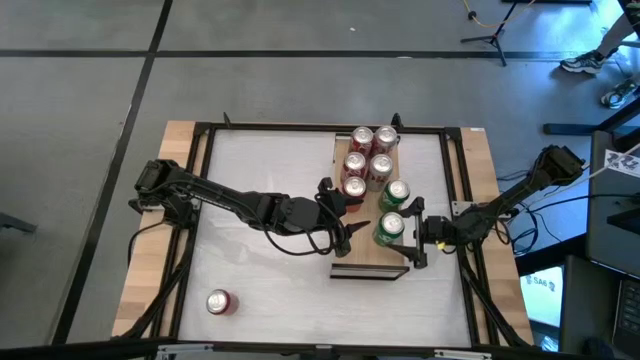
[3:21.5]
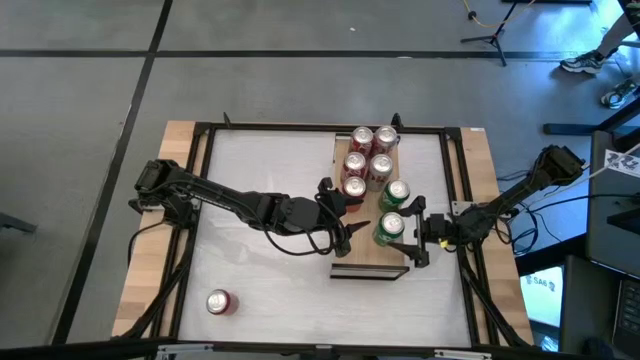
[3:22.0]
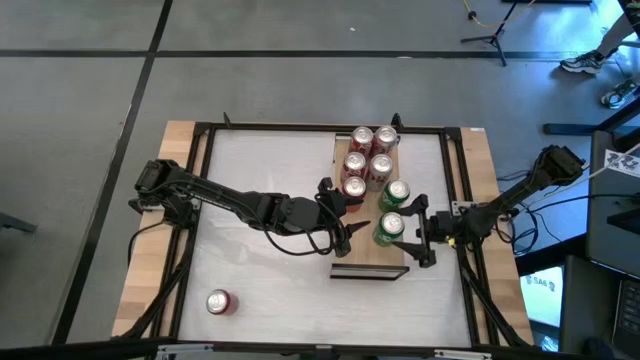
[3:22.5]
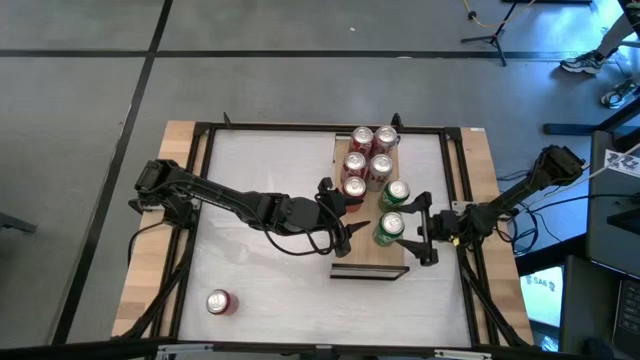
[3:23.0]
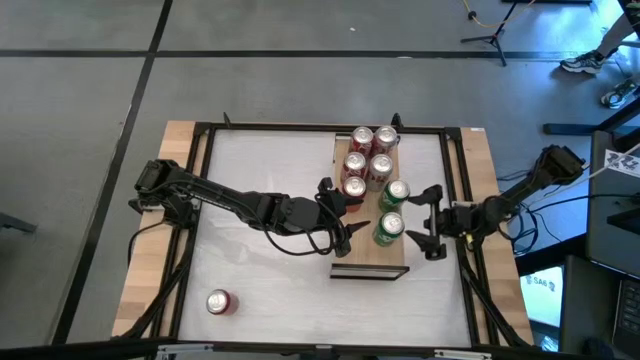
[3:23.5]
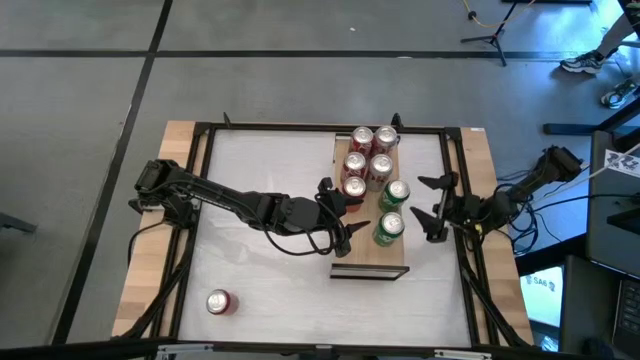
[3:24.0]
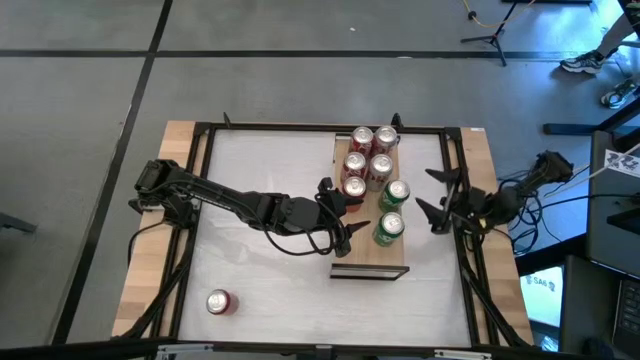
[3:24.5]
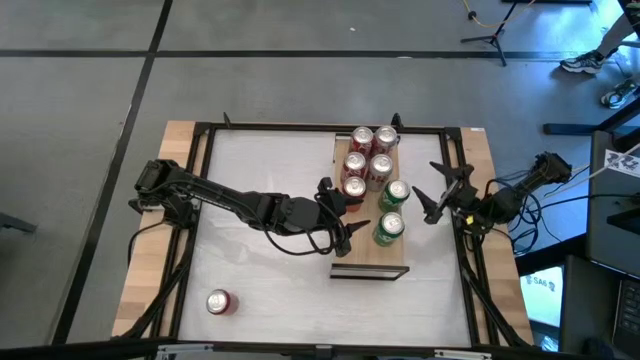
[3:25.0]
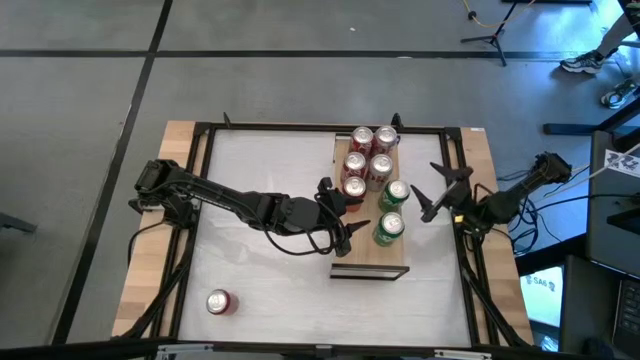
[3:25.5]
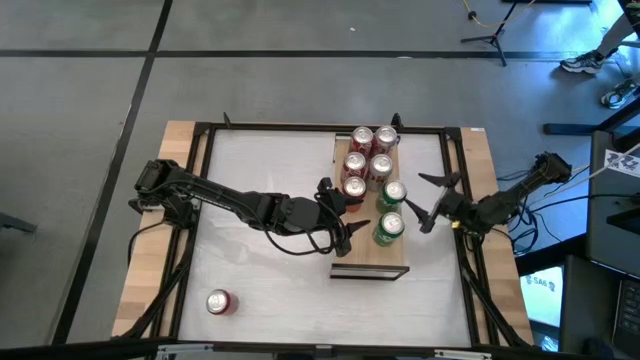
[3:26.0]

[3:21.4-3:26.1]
Task: Place canned beverage on shelf
Adjust the green soda can on the shelf

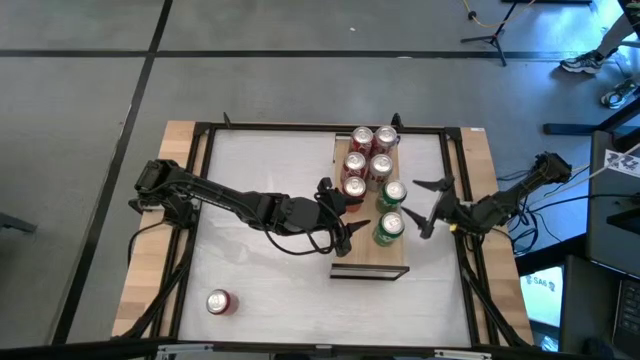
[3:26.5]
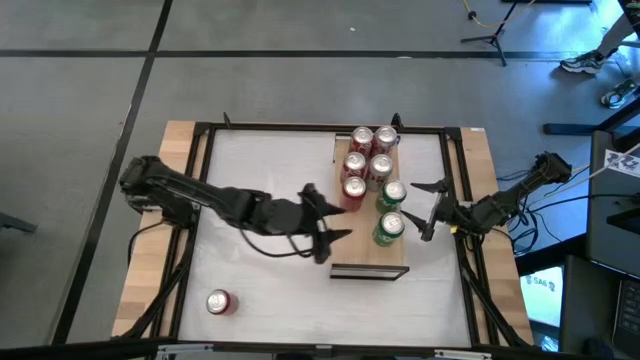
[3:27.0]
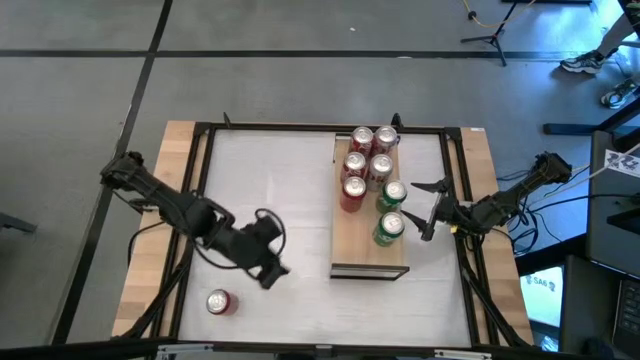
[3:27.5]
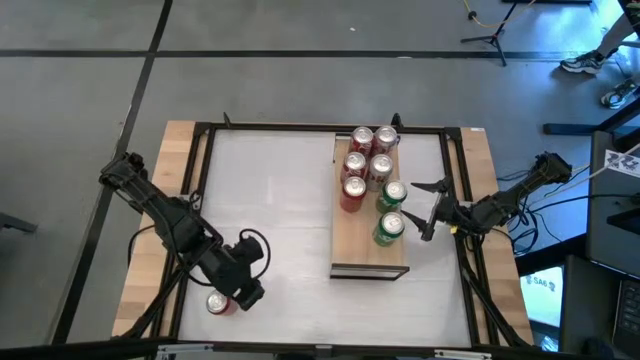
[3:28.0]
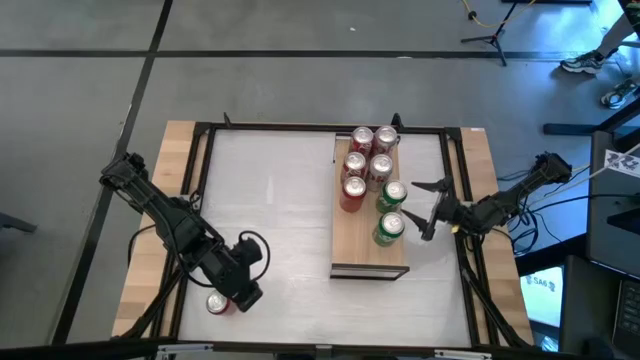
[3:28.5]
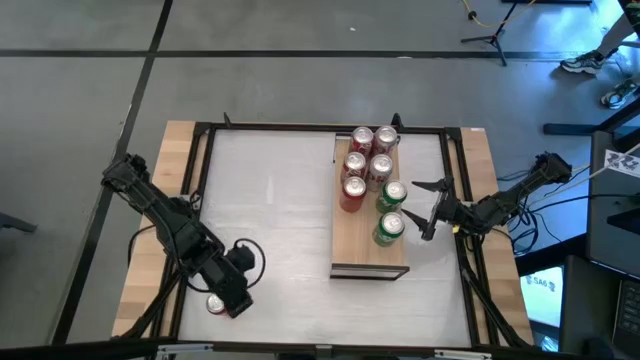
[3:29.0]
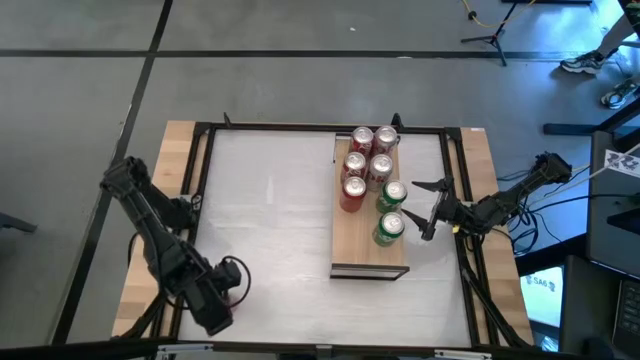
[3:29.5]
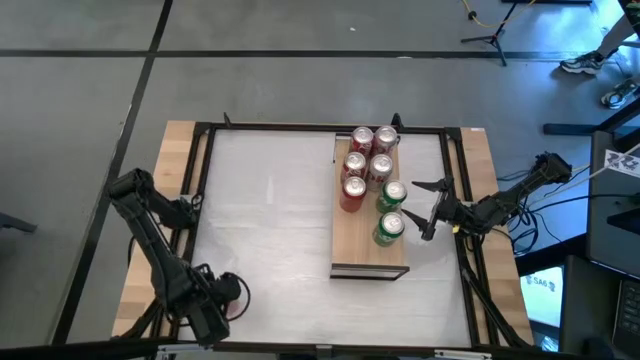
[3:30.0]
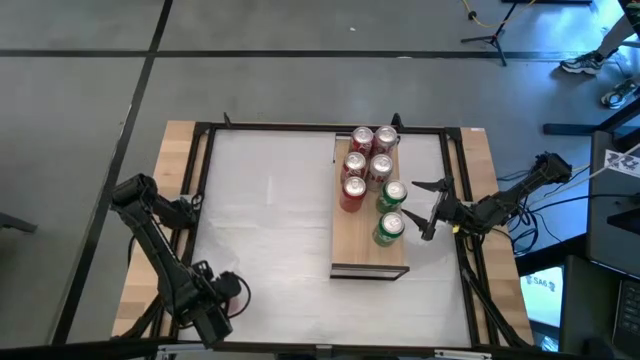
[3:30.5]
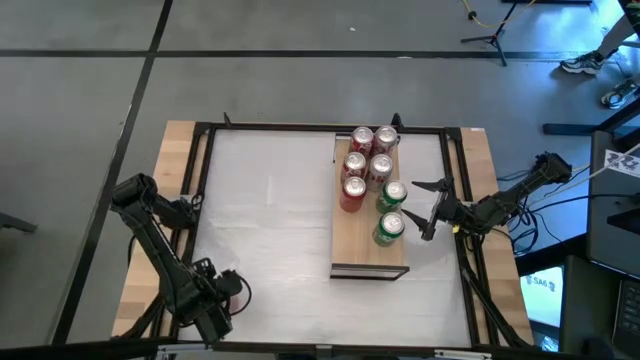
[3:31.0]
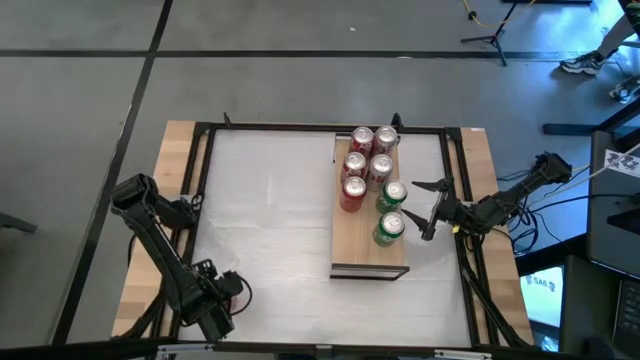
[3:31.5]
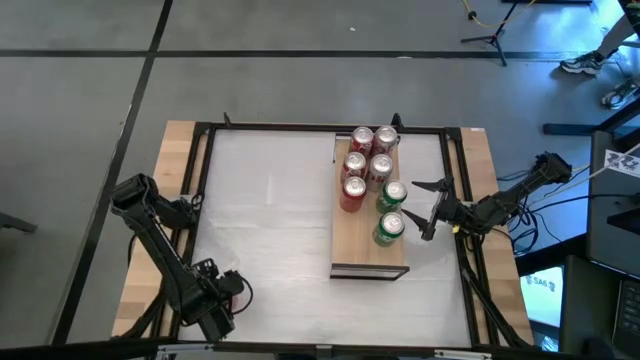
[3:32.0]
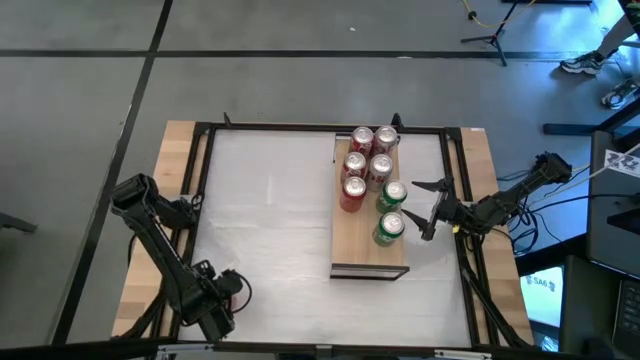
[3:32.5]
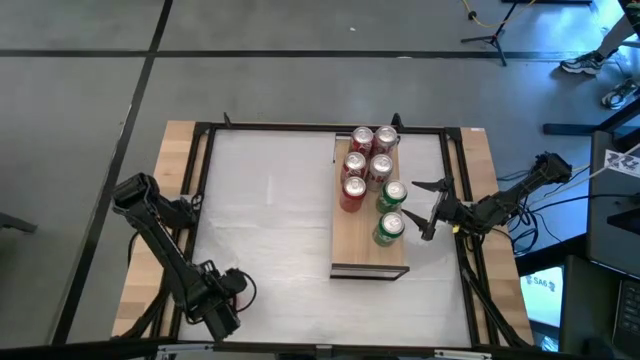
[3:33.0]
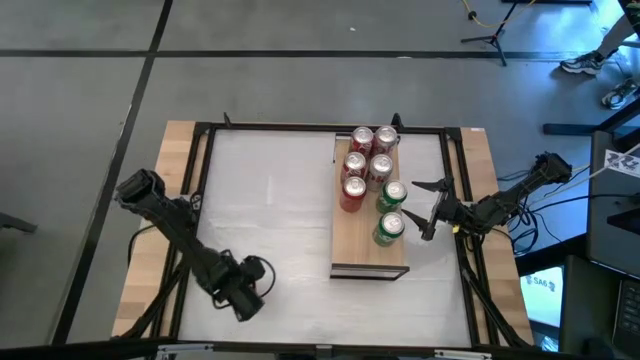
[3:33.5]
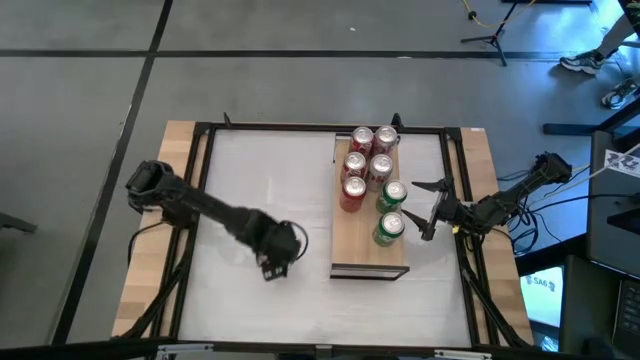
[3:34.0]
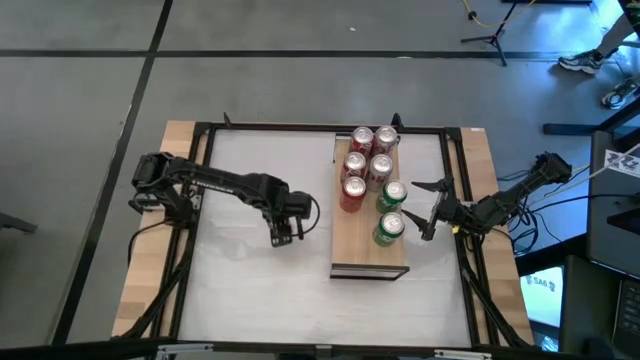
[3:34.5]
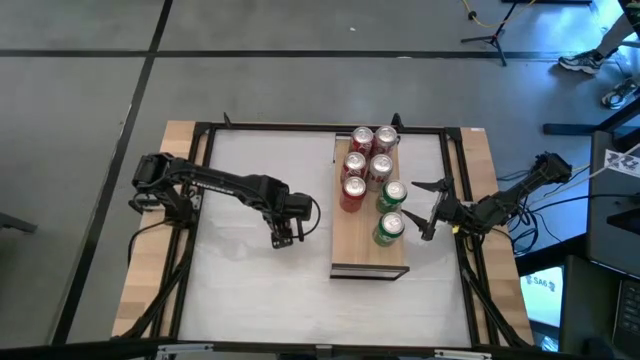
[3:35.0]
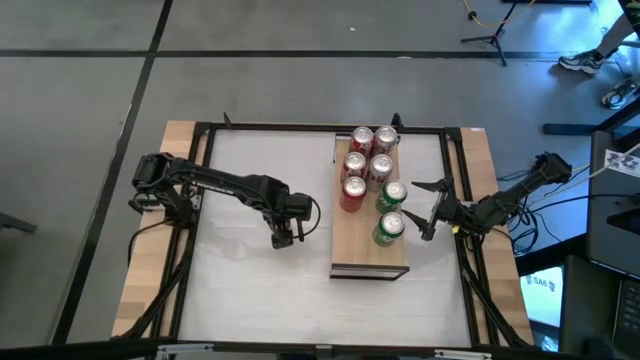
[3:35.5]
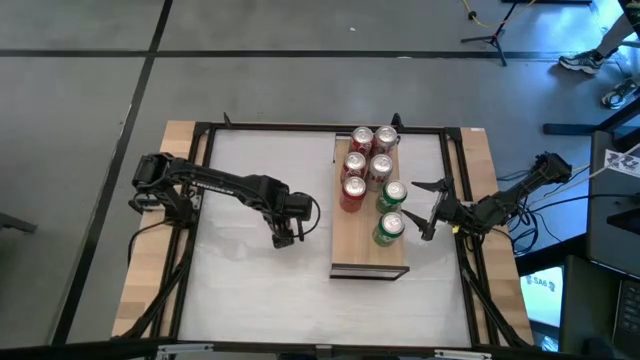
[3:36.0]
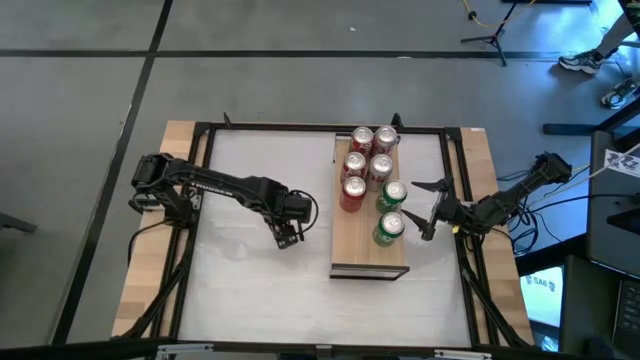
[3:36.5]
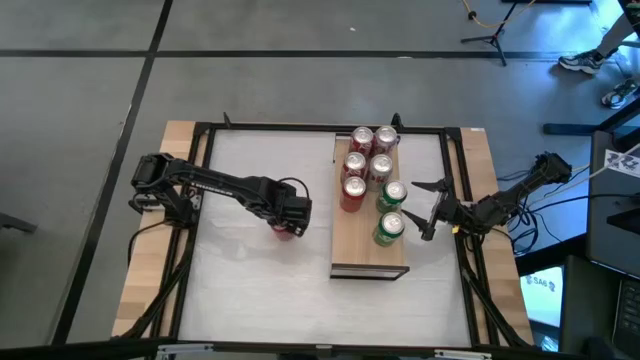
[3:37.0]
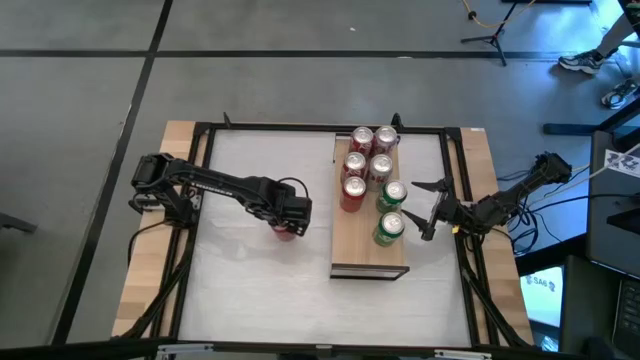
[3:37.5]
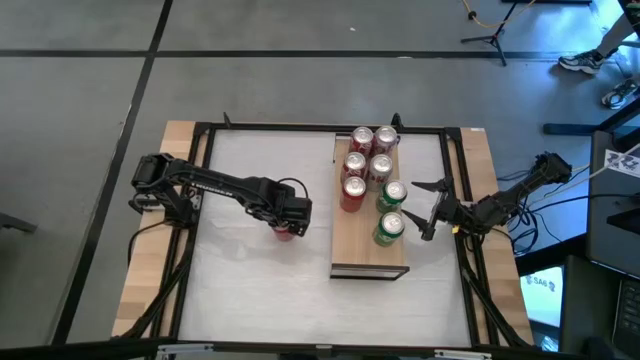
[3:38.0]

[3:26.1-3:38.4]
Put the red black soda can on the shelf aligned with the other red black soda can

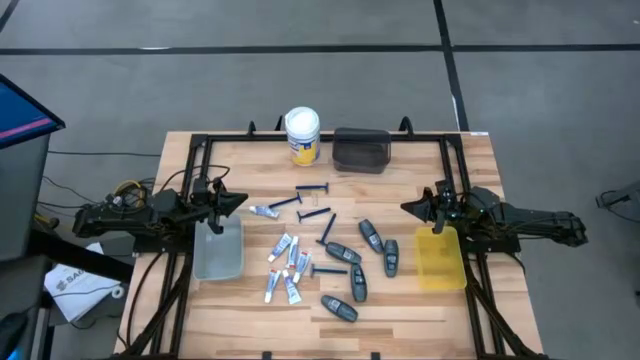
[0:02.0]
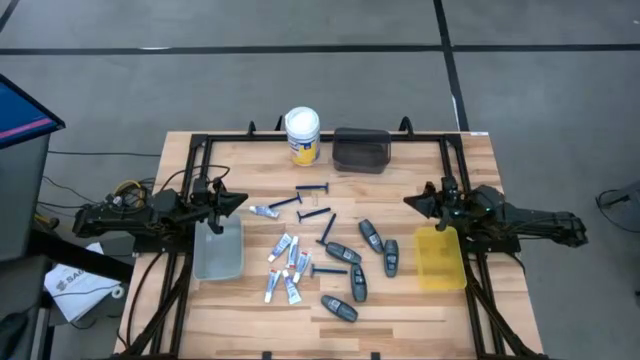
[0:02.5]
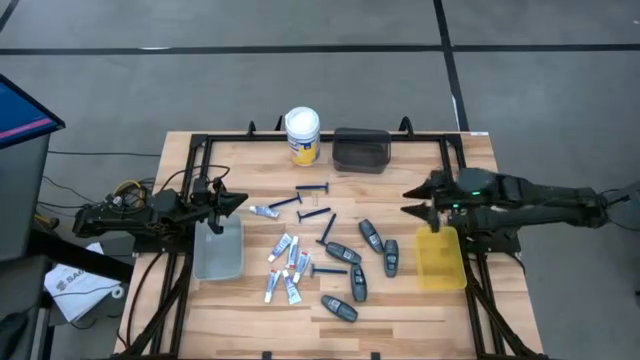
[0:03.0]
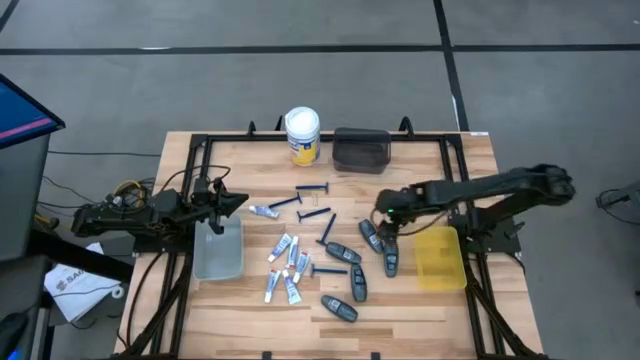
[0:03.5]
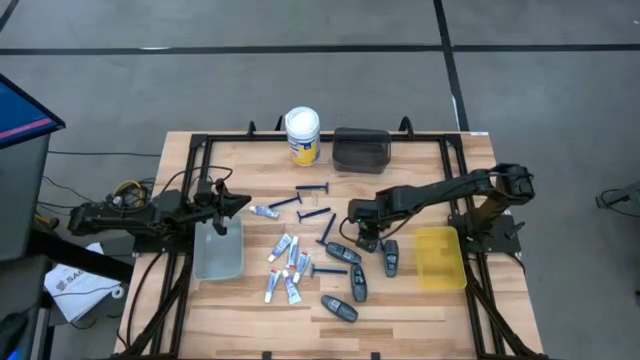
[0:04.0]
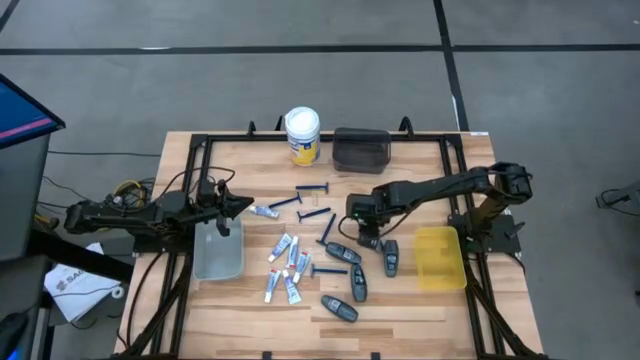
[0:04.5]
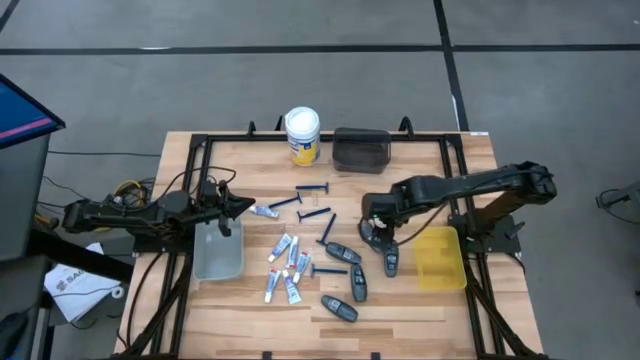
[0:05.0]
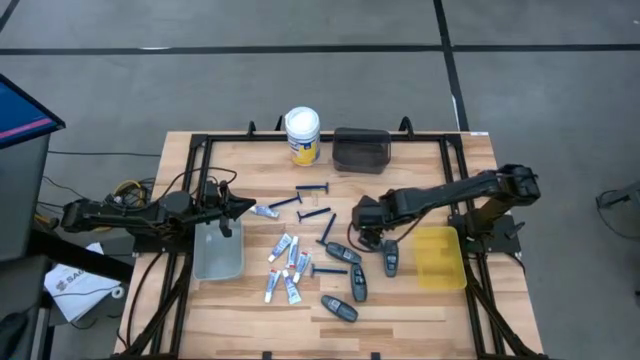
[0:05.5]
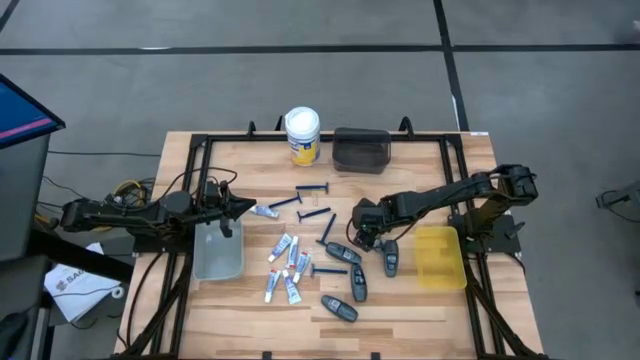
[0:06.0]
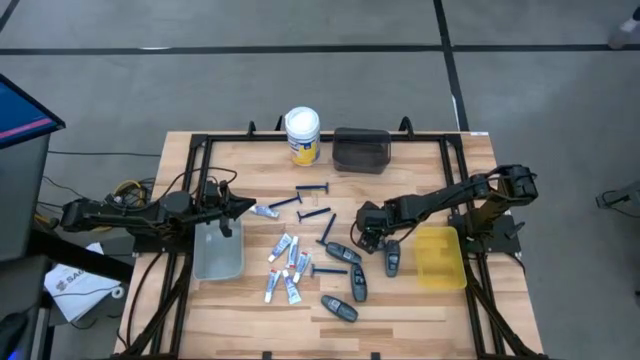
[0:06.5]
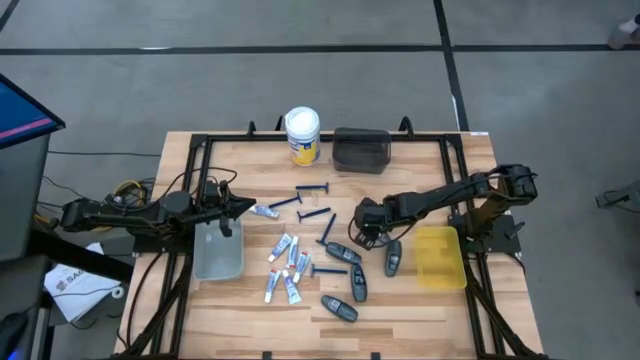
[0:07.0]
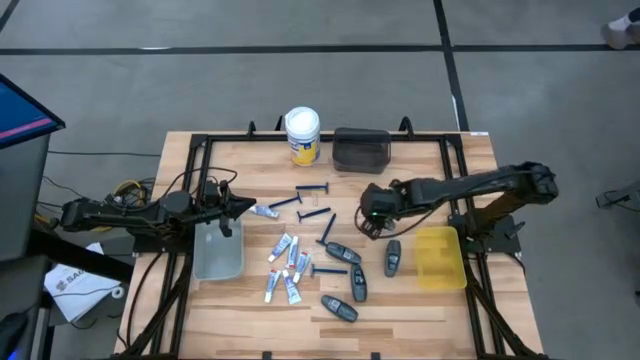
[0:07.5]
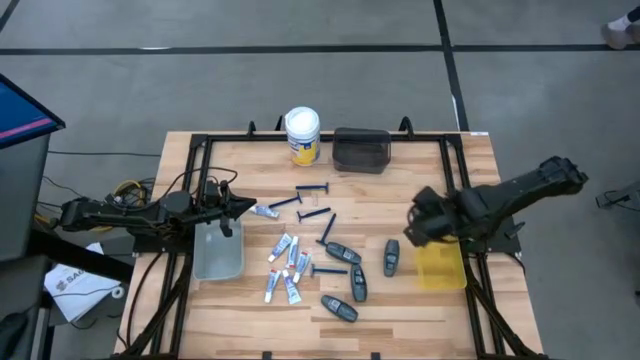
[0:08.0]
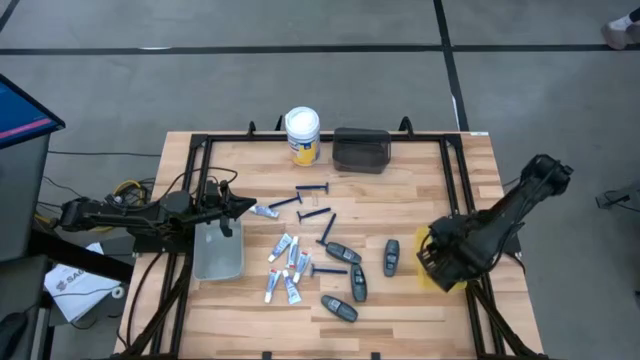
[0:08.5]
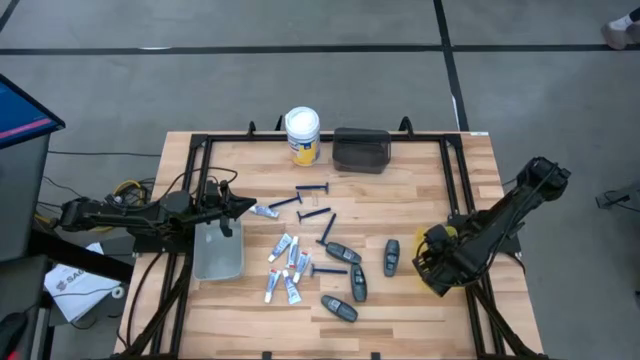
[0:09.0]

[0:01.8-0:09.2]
Task: Pick & Place Travel size toiletries
Put the black deodorant into the yellow bin
